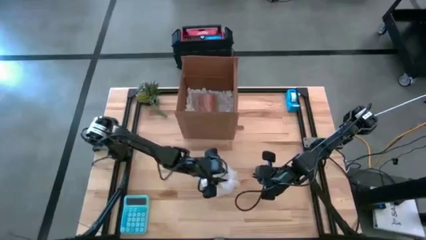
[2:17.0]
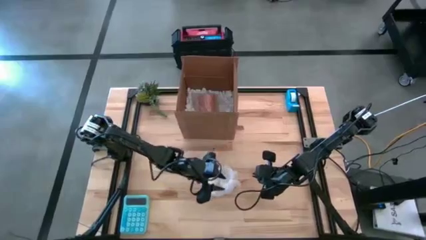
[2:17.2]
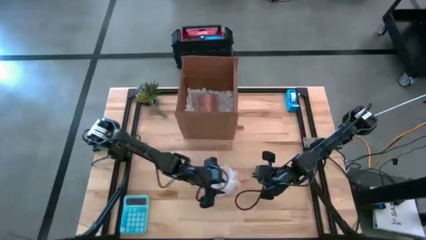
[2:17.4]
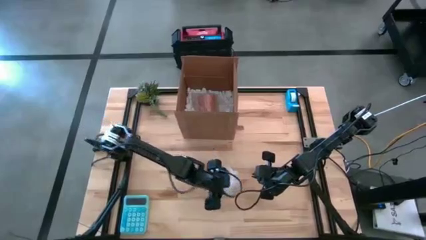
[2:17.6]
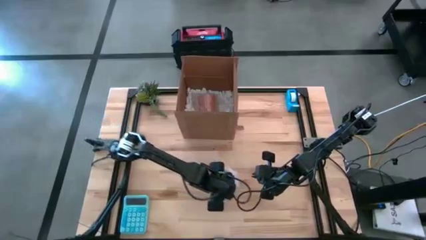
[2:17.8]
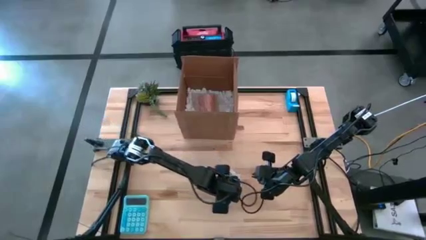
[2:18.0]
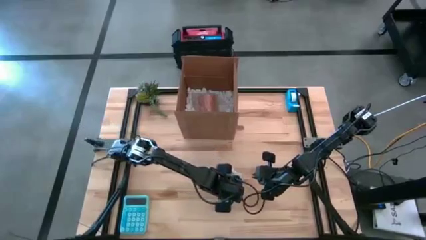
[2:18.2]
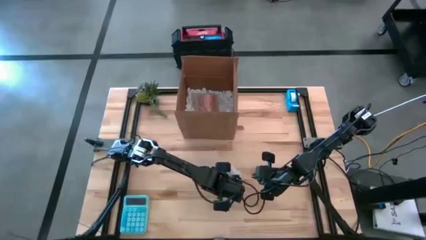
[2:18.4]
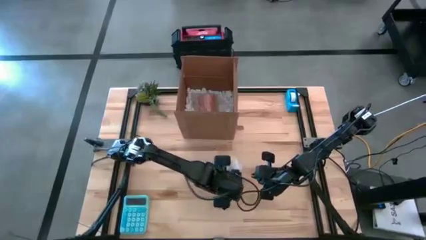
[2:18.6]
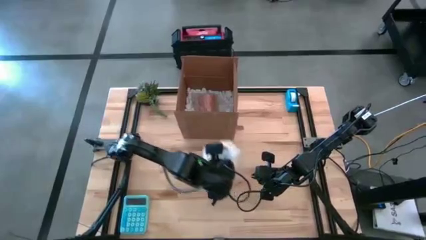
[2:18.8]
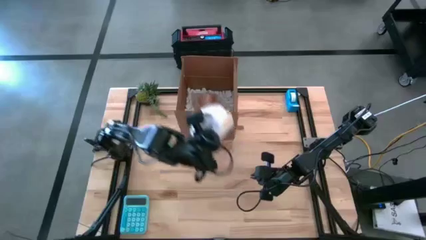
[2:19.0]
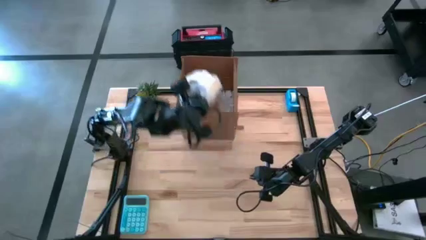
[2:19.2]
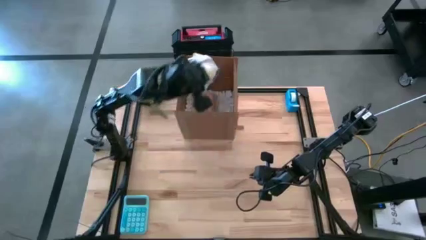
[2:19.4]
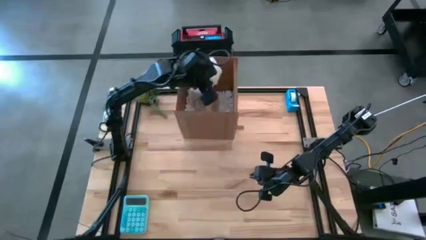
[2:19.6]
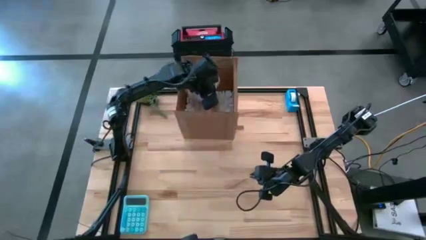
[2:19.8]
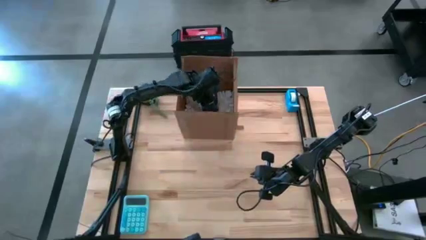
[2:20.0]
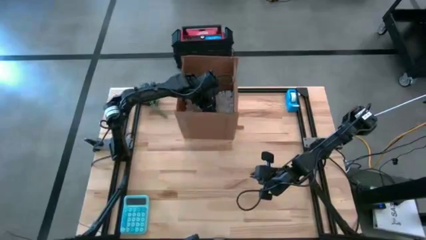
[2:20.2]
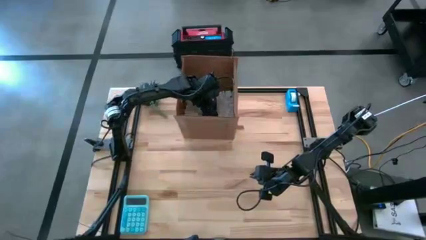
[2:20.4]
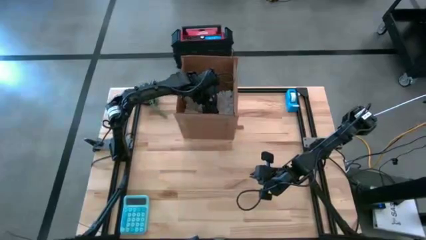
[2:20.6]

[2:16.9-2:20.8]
Task: wrap mug
Put the wrapped yellow mug into the cardboard box

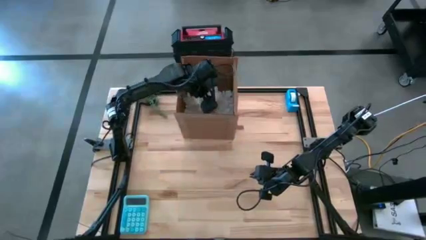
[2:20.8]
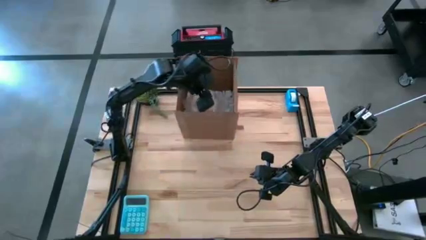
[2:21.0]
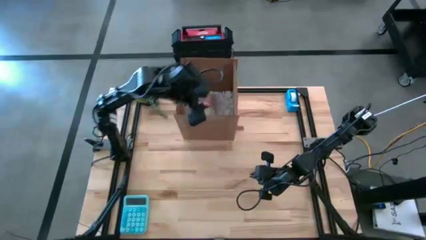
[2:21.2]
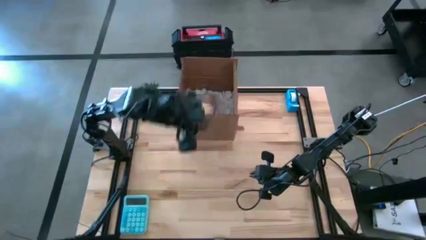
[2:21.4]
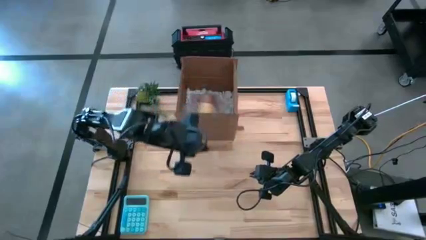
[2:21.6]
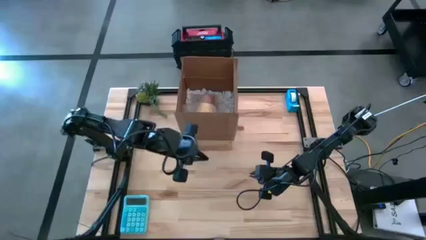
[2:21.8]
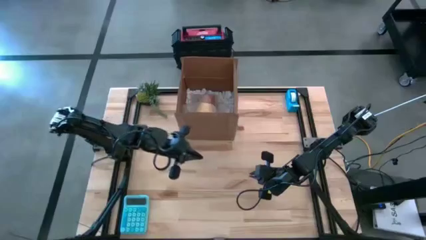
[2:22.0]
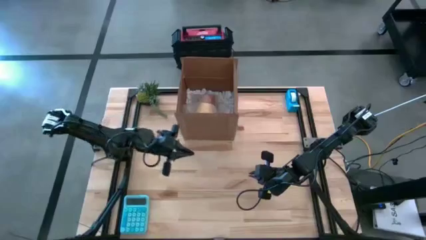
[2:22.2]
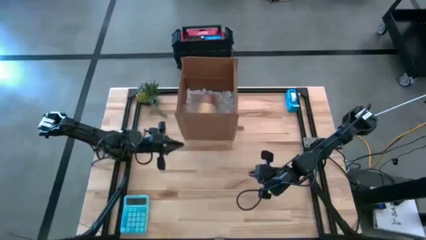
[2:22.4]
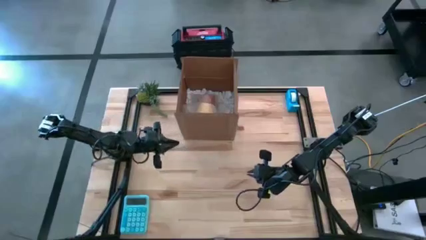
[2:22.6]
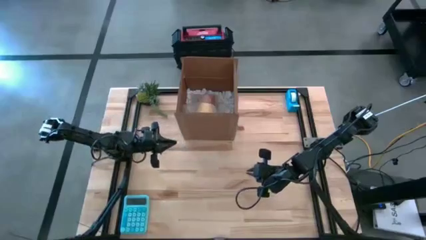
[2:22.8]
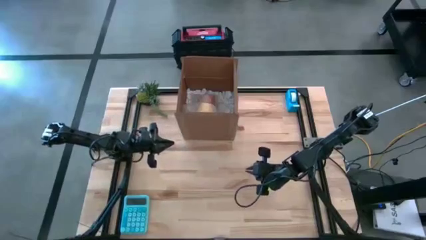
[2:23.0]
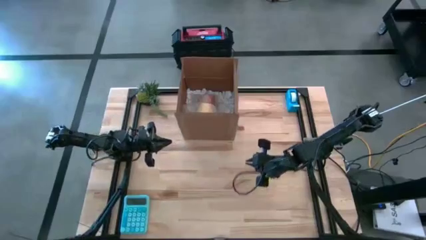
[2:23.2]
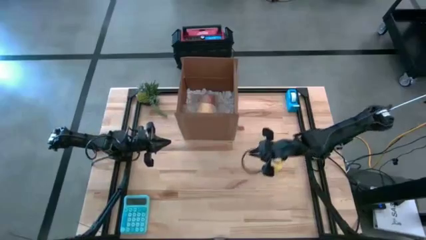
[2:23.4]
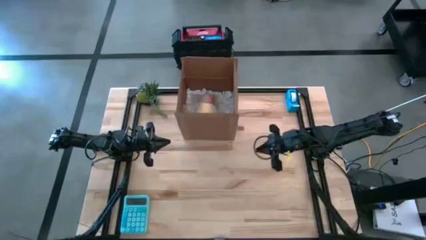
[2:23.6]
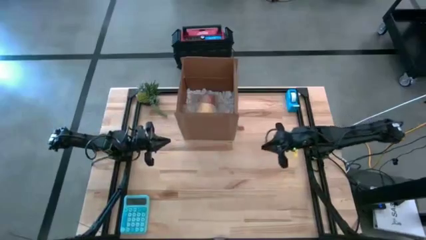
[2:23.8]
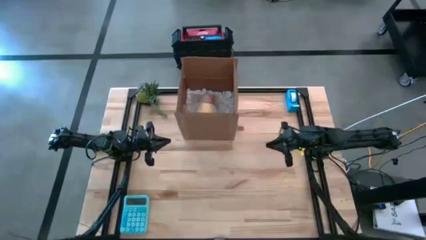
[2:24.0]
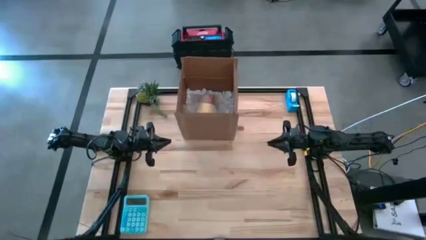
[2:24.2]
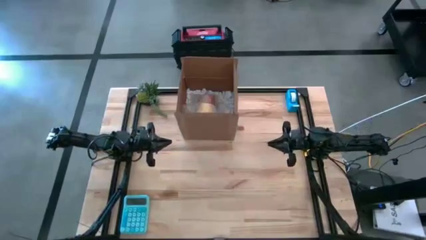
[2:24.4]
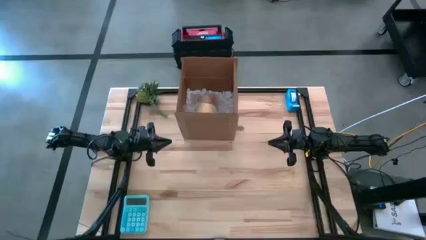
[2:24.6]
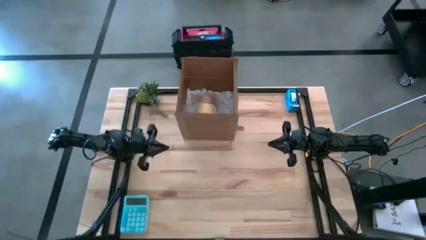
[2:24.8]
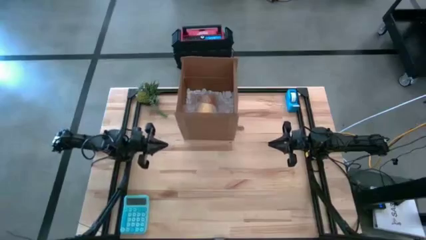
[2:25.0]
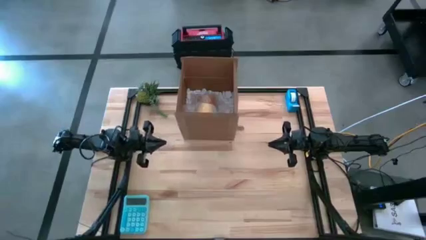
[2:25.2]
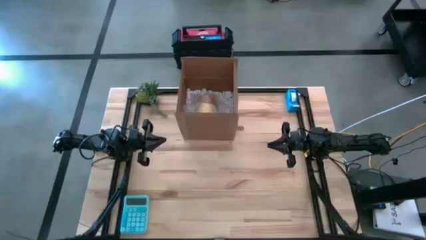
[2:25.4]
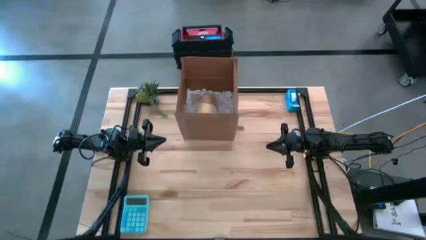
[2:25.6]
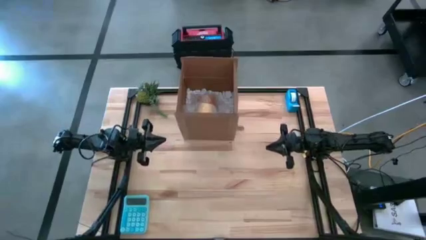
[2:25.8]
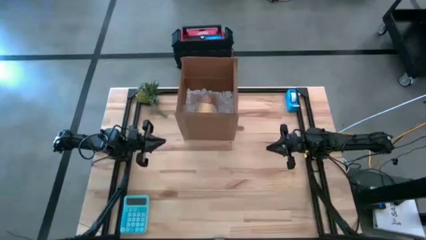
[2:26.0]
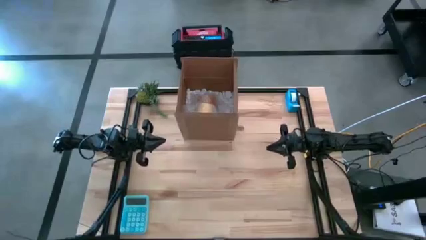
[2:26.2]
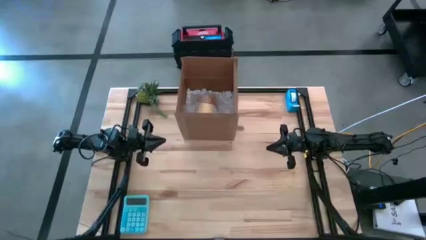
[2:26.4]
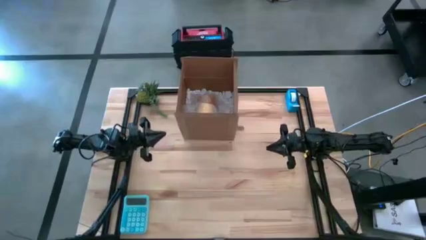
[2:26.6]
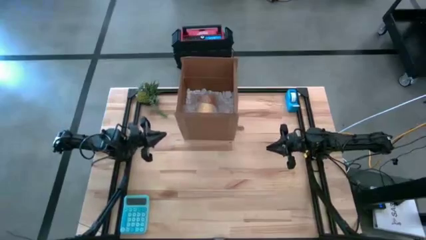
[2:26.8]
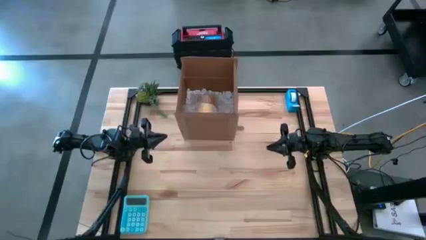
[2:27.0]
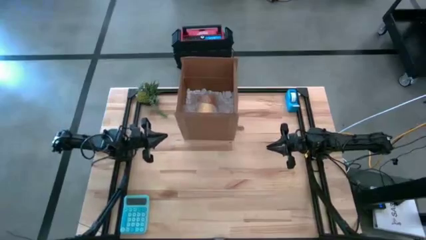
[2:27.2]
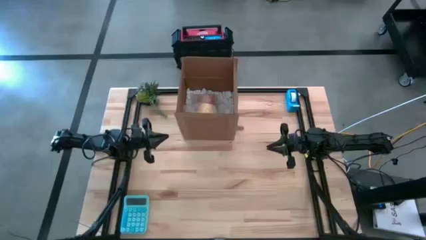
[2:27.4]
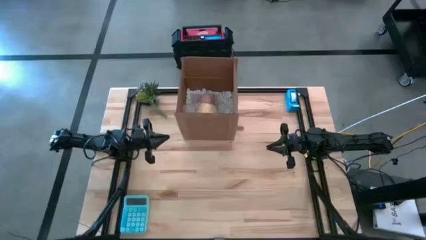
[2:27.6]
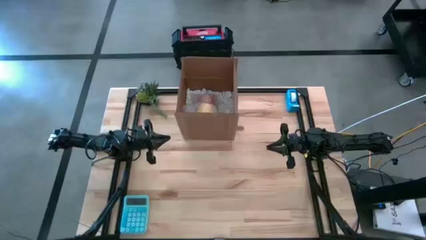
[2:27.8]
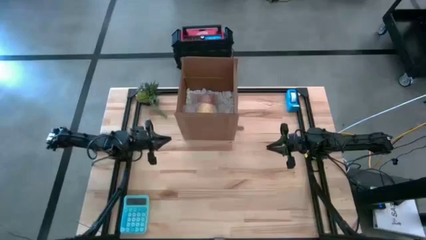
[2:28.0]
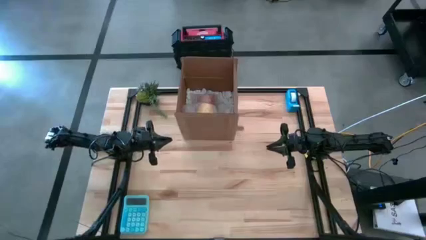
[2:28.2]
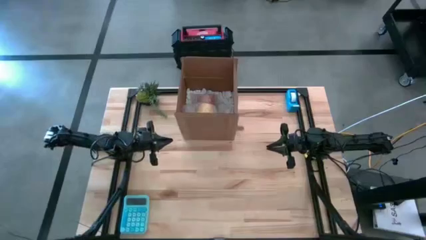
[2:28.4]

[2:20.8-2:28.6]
Return to home position

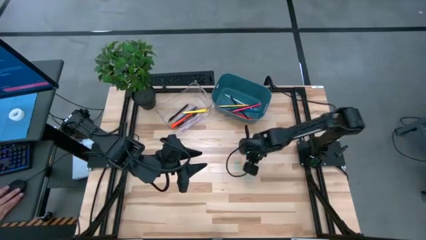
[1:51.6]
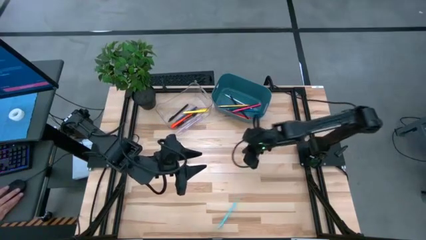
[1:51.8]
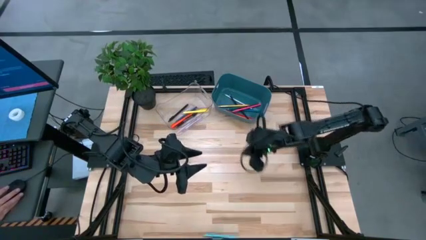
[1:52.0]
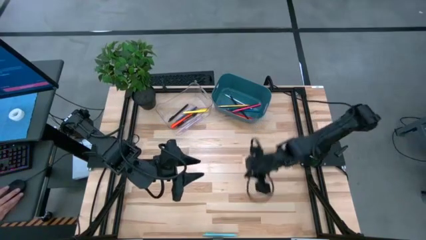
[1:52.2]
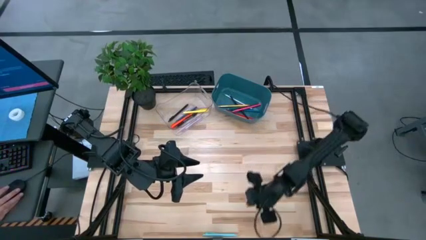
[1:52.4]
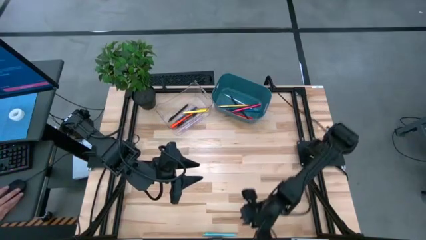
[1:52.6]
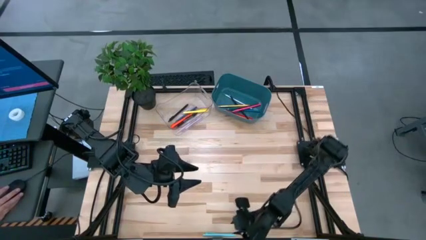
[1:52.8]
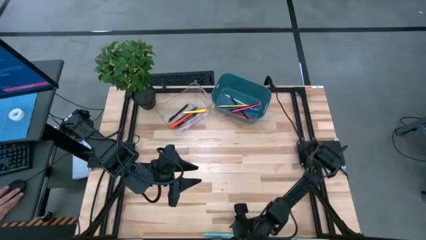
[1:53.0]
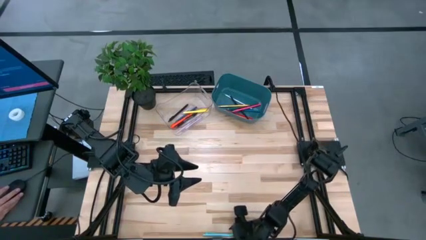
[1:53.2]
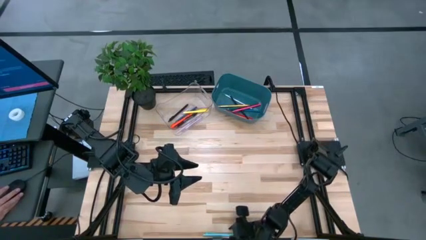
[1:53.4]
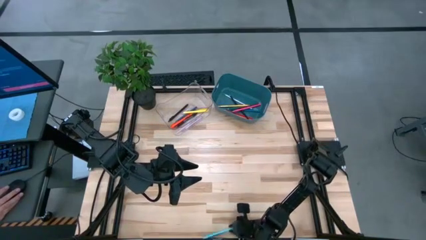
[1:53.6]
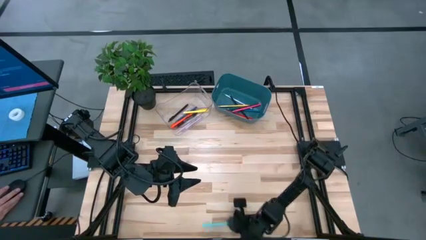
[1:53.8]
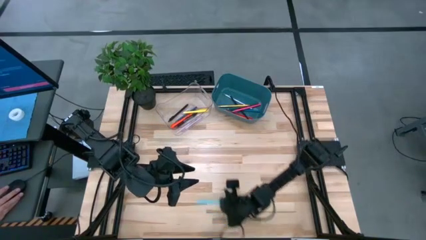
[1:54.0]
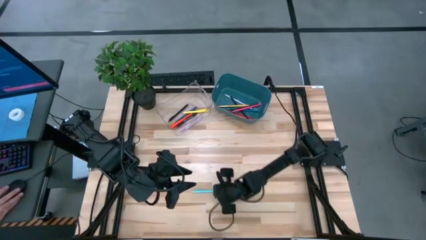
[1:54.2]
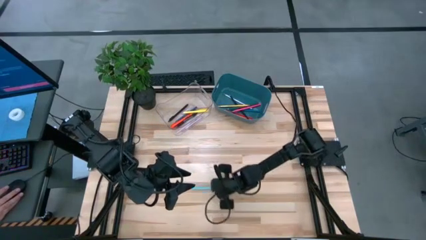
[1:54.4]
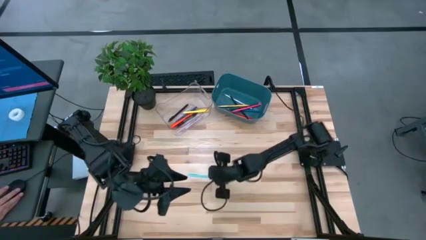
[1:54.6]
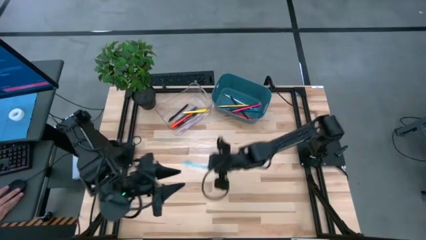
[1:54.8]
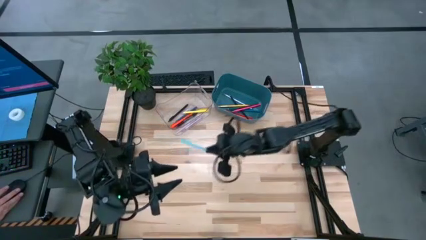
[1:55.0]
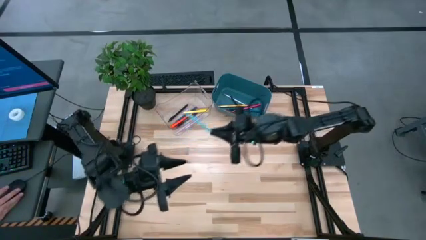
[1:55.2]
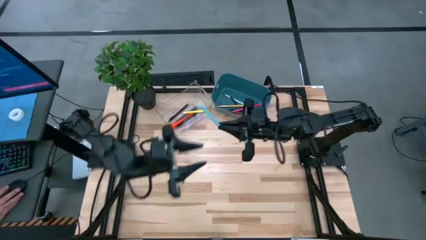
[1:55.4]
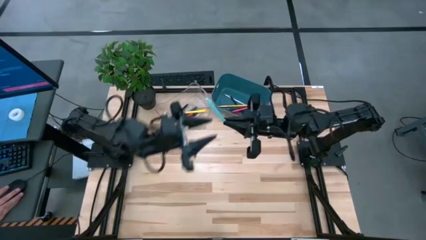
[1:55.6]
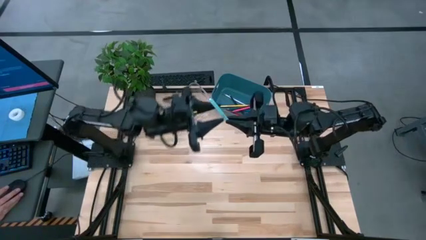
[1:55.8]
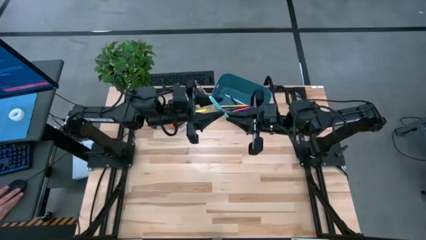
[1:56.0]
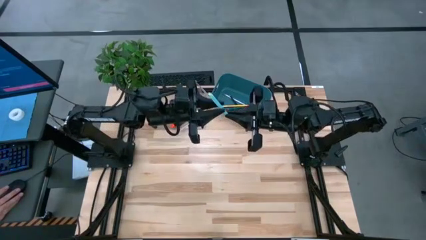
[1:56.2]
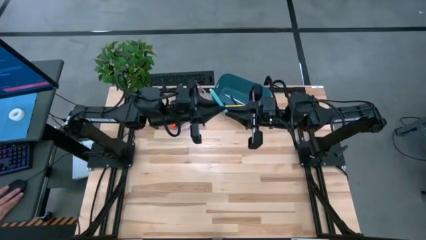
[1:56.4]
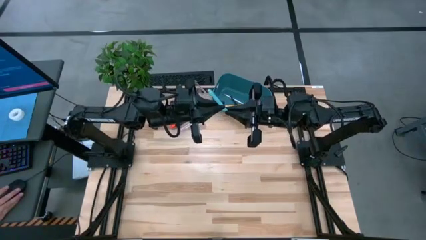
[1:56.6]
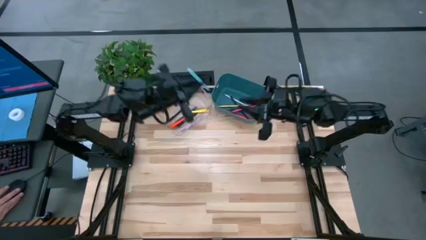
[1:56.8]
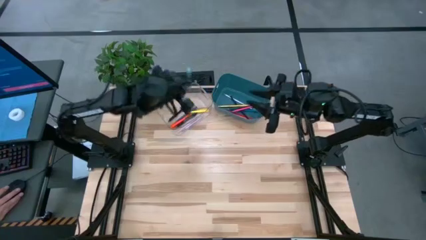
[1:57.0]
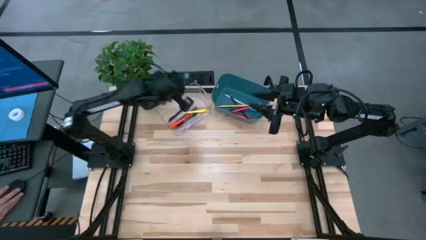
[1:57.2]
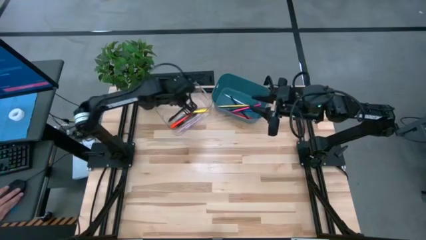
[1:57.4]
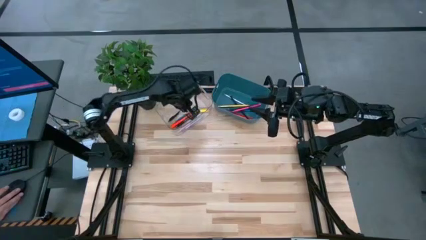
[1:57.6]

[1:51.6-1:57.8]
Task: Sort pens & pencils
Put the blue pen into the transparent bin
